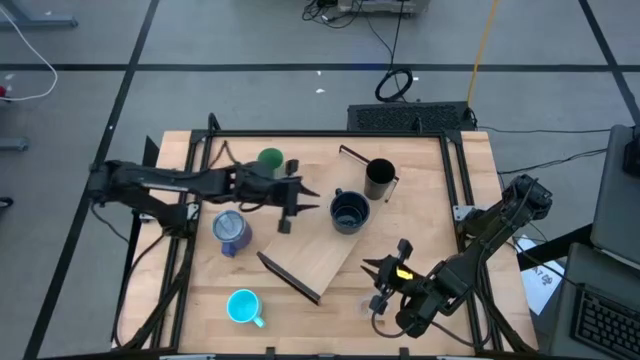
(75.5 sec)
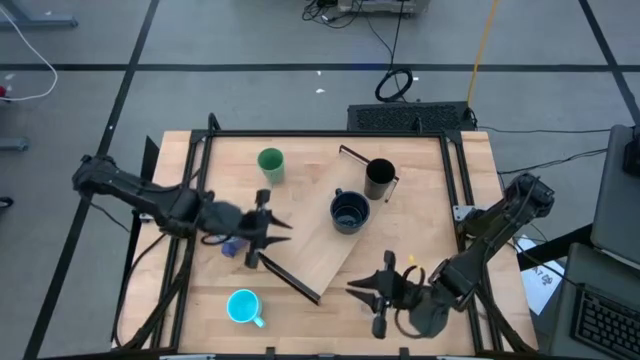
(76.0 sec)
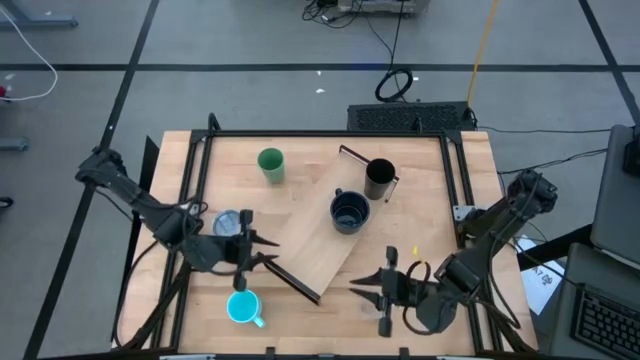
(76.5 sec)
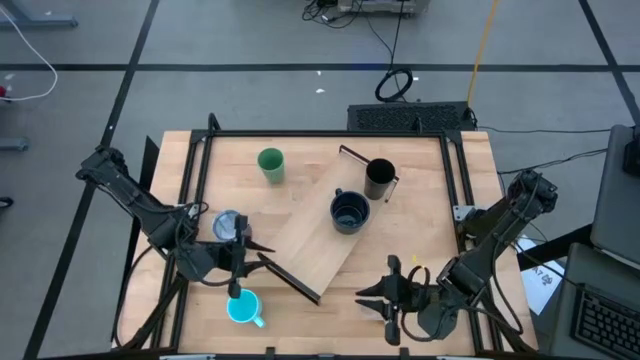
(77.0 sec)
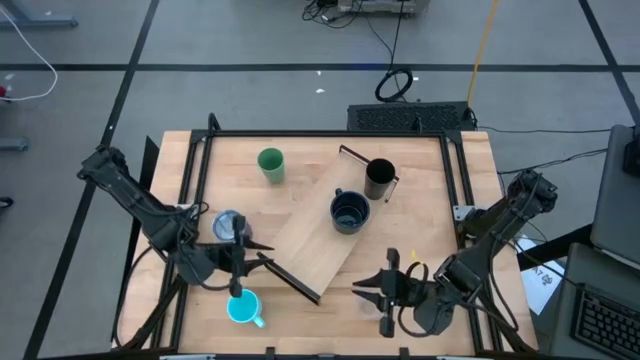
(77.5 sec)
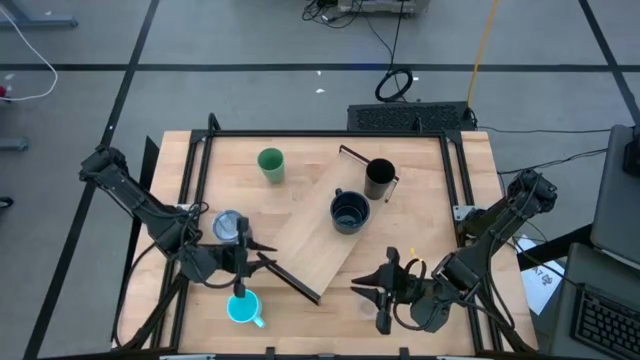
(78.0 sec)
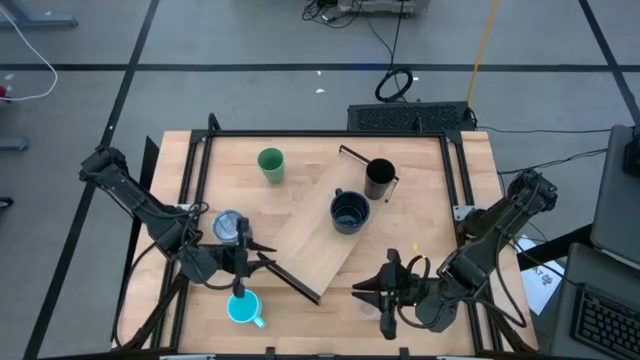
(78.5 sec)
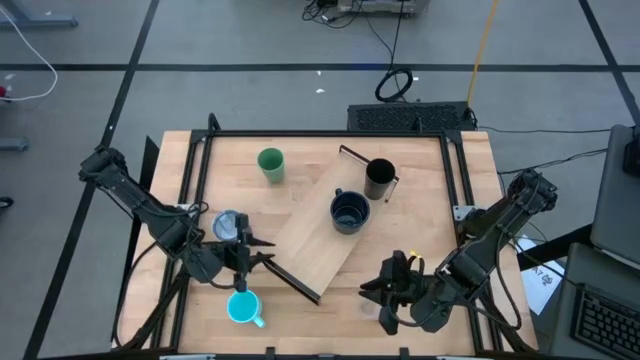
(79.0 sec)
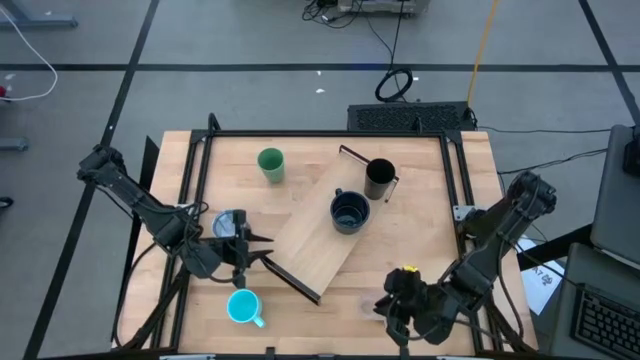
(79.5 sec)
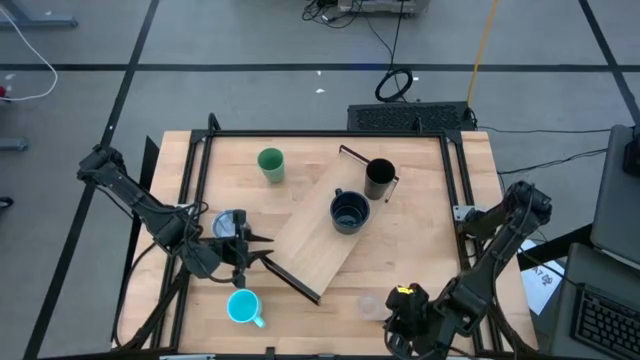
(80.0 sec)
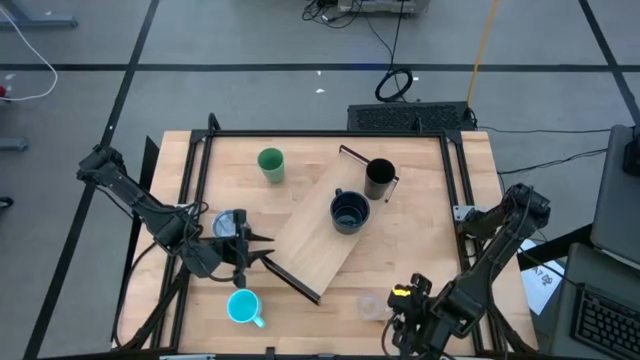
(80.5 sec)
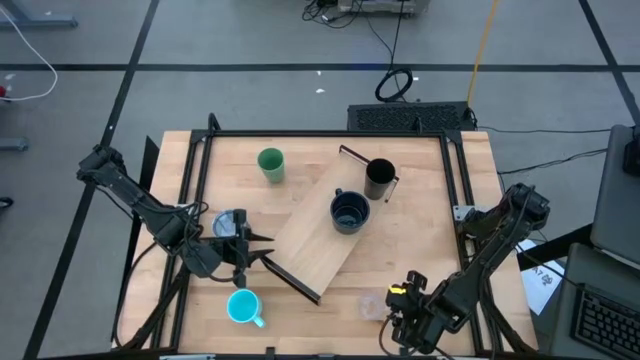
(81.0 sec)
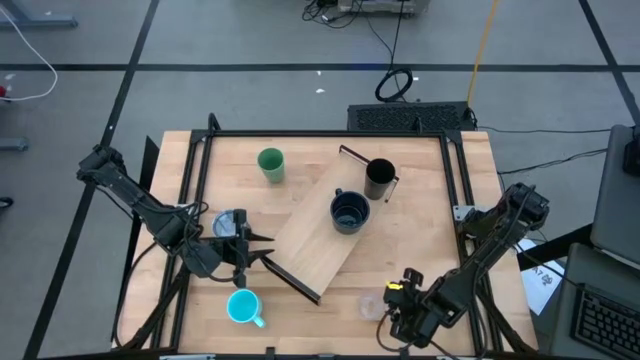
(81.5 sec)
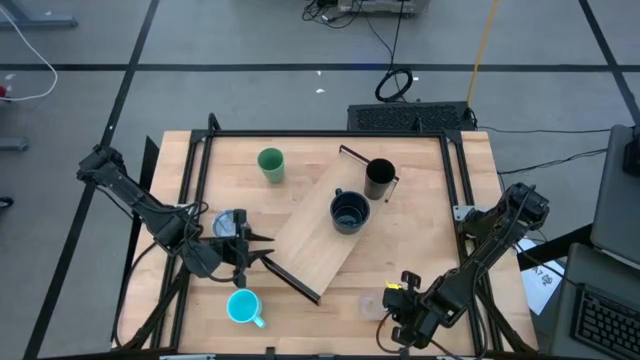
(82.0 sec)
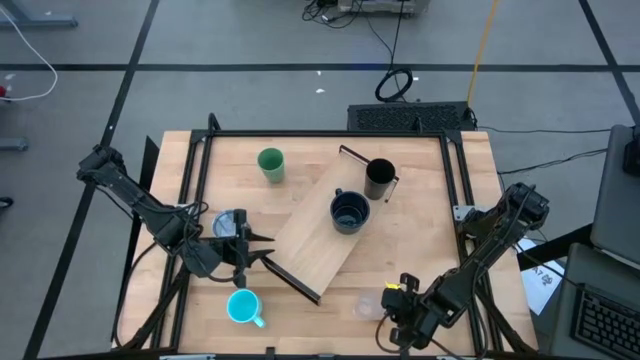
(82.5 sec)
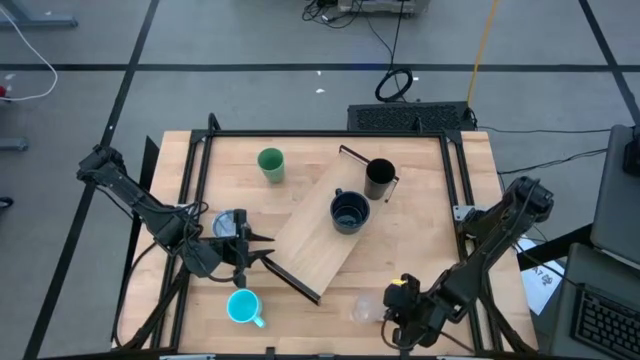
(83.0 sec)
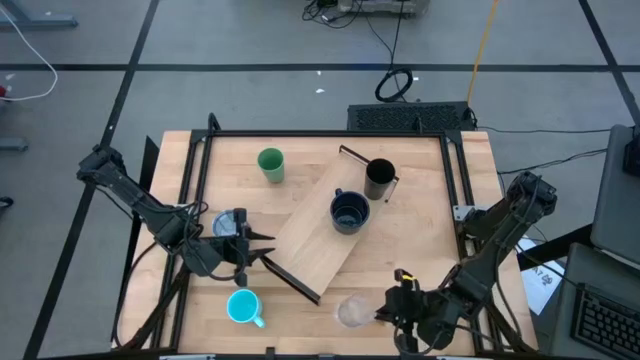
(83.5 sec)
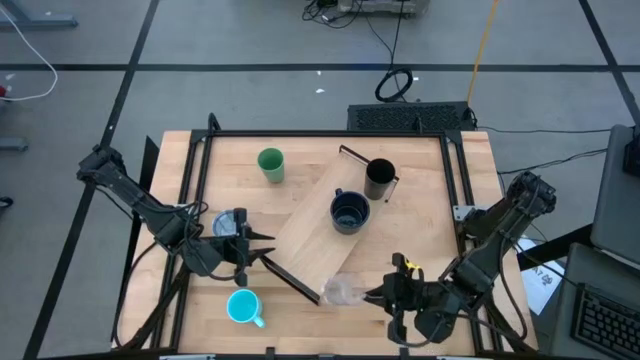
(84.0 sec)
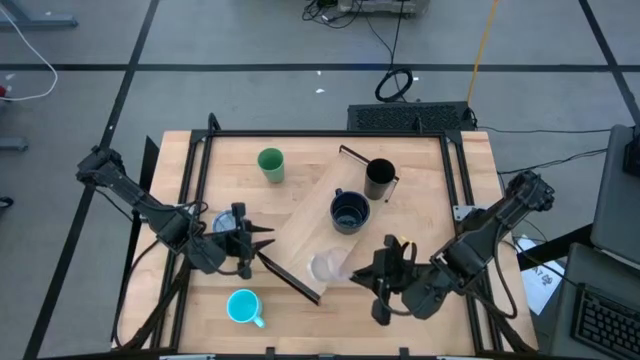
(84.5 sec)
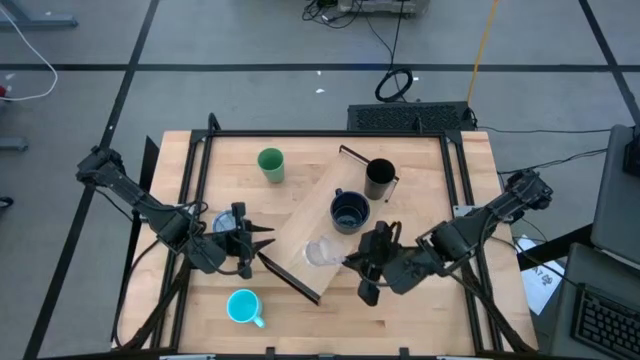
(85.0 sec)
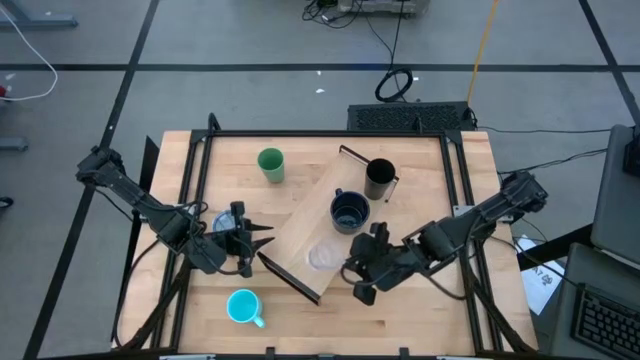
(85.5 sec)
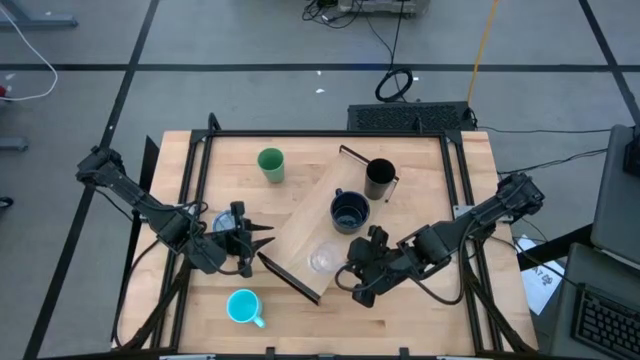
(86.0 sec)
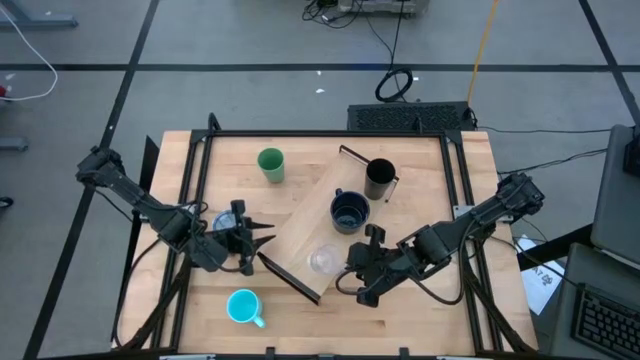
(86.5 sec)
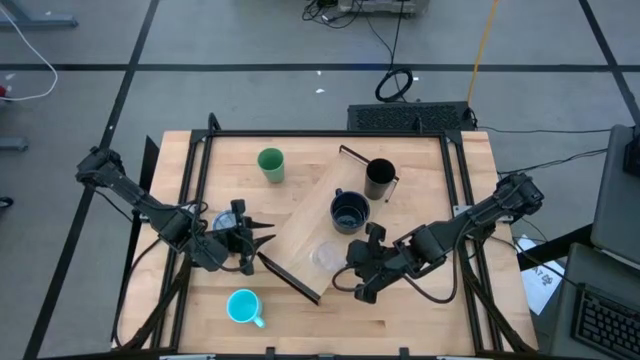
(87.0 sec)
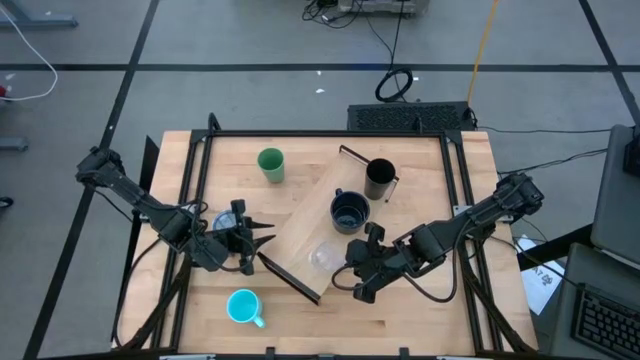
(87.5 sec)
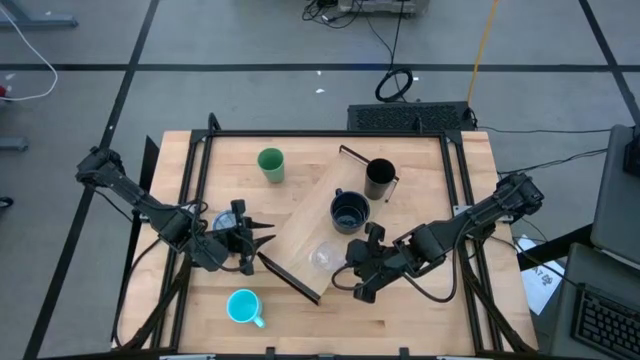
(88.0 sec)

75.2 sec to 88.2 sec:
Task: Stack small to large cups/mugs on shelf
Put the transparent cup on the shelf
